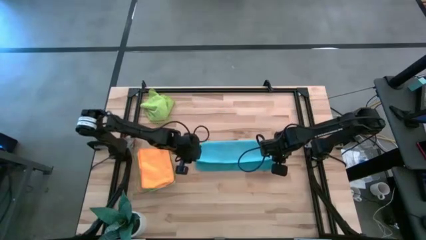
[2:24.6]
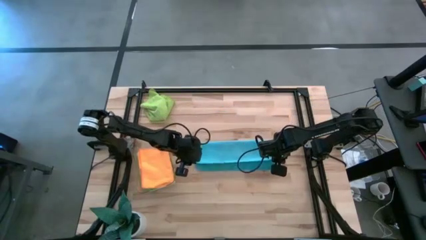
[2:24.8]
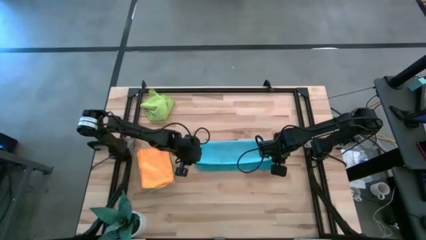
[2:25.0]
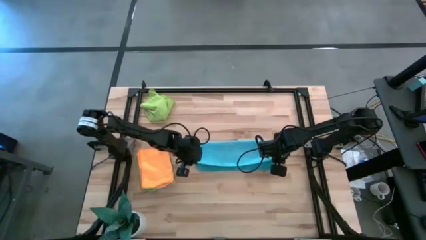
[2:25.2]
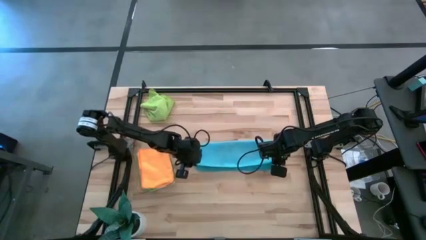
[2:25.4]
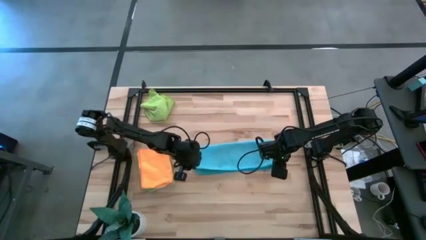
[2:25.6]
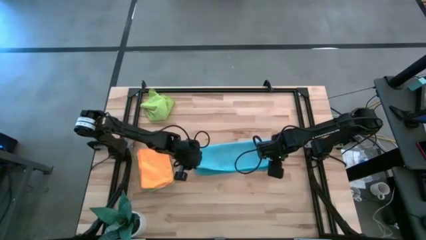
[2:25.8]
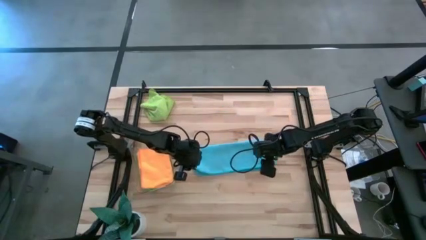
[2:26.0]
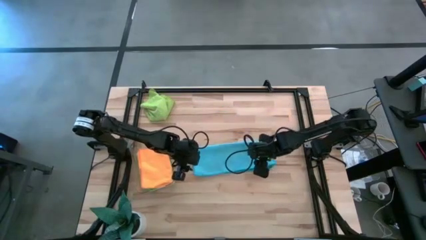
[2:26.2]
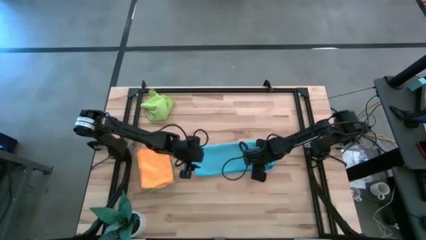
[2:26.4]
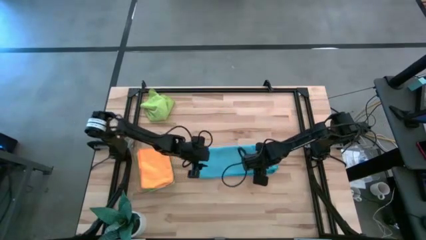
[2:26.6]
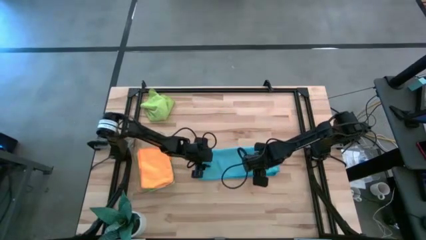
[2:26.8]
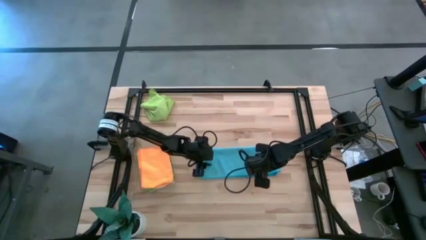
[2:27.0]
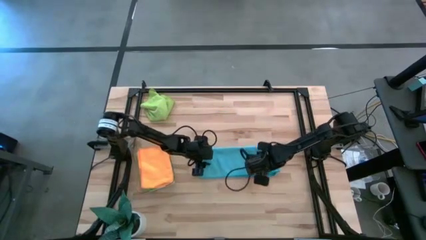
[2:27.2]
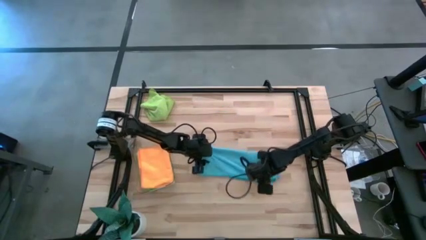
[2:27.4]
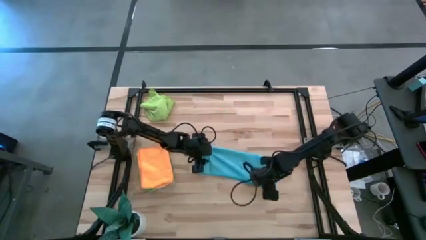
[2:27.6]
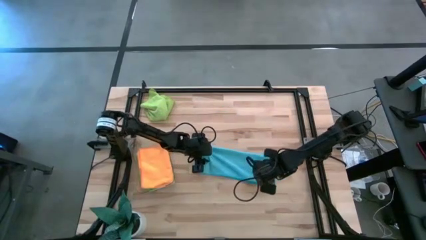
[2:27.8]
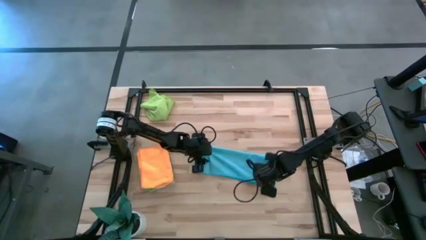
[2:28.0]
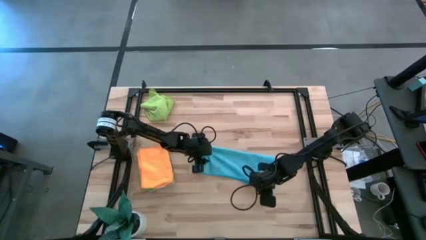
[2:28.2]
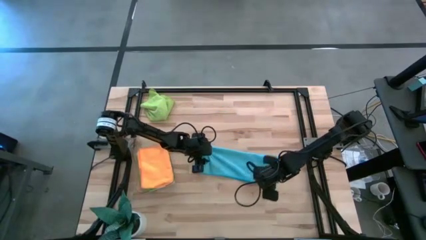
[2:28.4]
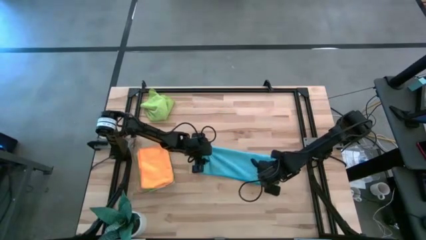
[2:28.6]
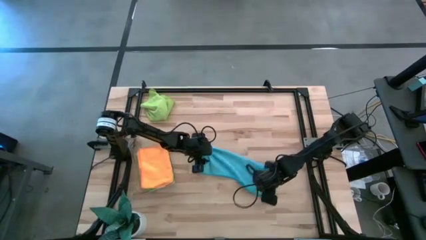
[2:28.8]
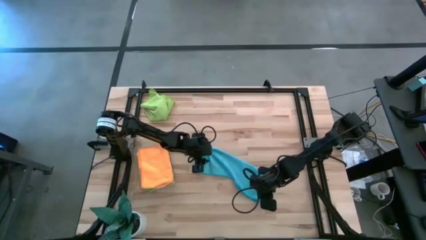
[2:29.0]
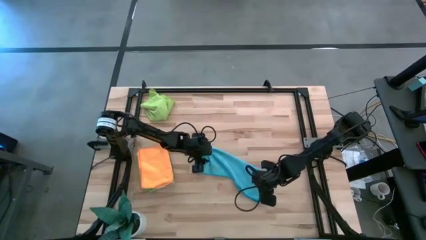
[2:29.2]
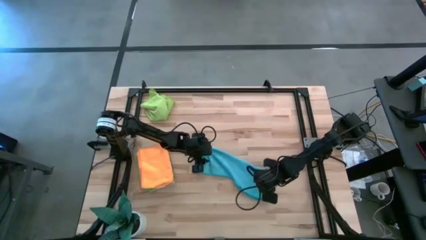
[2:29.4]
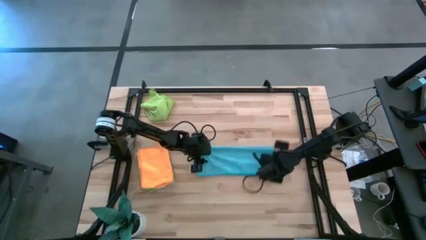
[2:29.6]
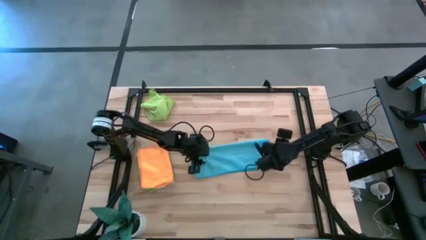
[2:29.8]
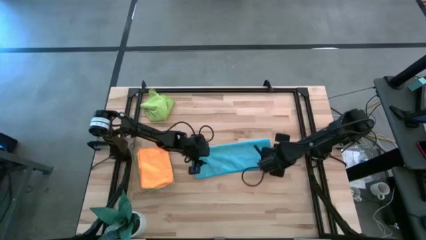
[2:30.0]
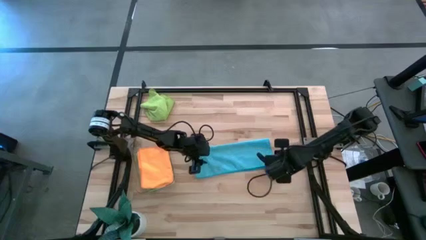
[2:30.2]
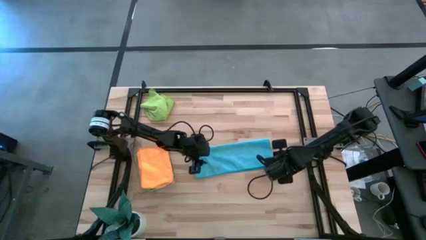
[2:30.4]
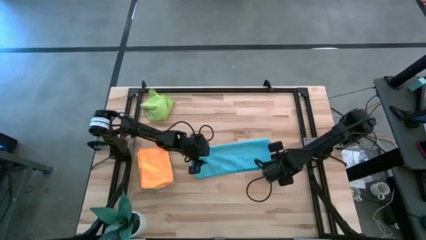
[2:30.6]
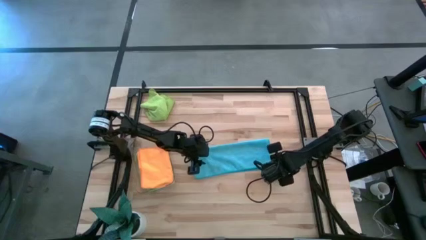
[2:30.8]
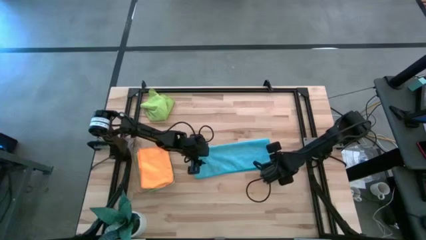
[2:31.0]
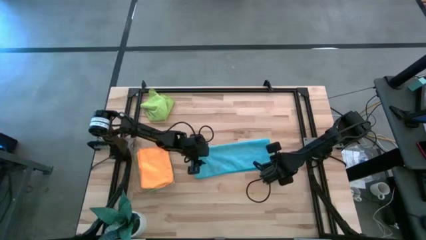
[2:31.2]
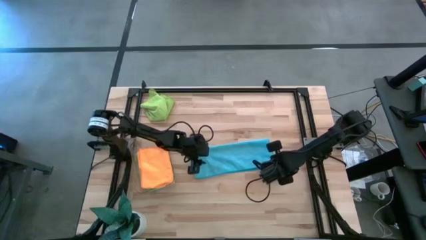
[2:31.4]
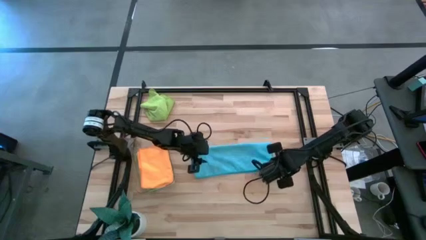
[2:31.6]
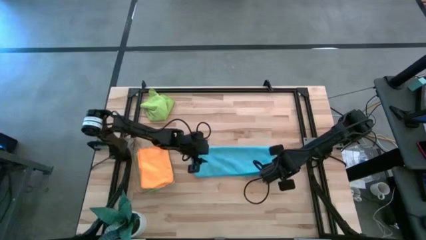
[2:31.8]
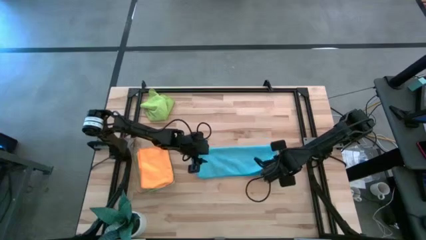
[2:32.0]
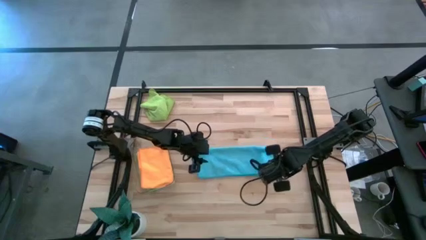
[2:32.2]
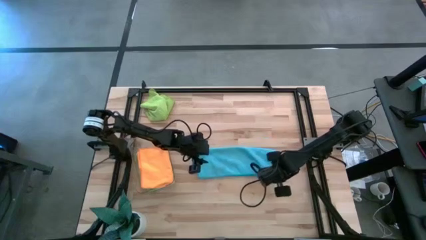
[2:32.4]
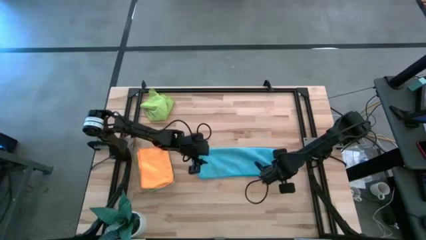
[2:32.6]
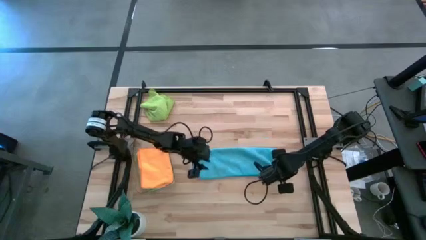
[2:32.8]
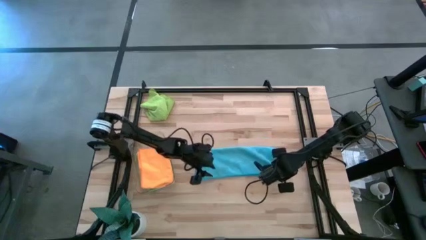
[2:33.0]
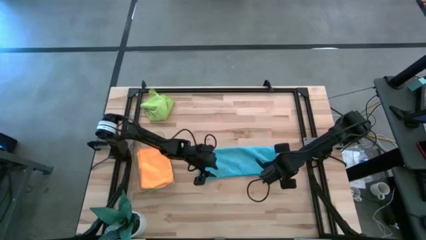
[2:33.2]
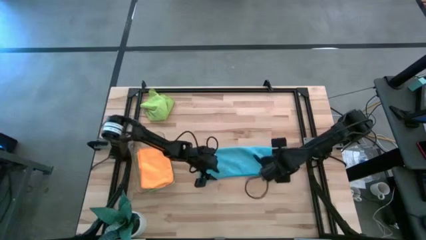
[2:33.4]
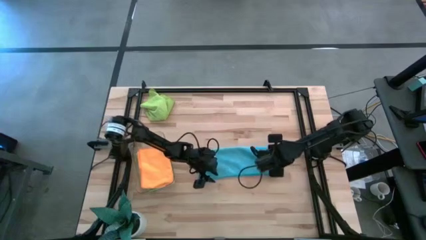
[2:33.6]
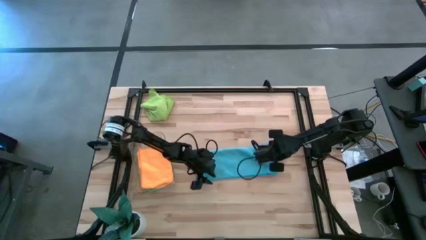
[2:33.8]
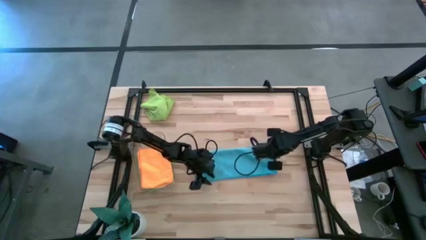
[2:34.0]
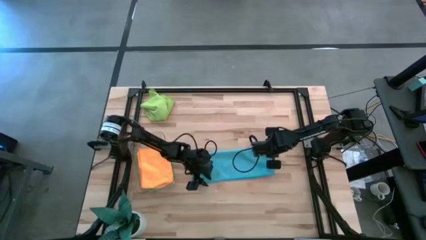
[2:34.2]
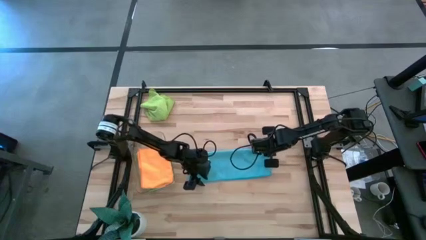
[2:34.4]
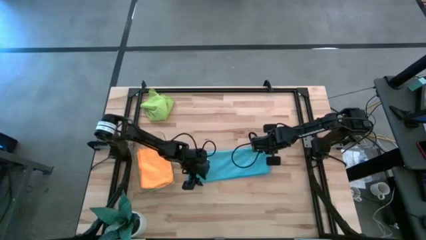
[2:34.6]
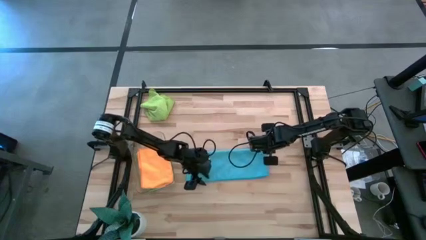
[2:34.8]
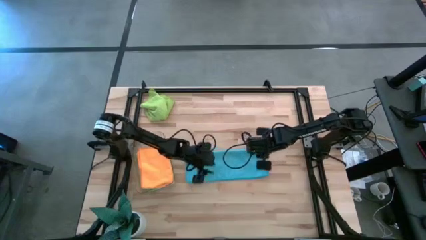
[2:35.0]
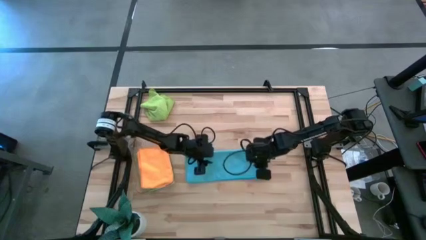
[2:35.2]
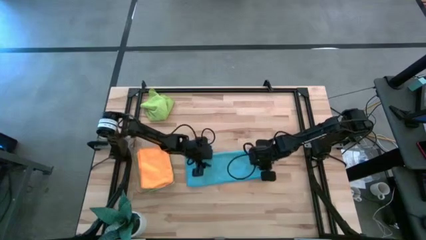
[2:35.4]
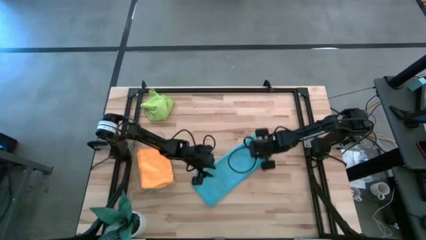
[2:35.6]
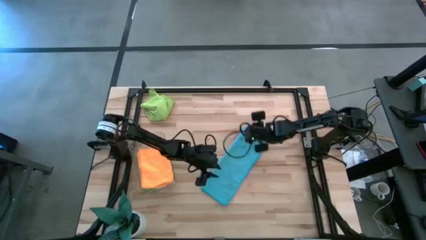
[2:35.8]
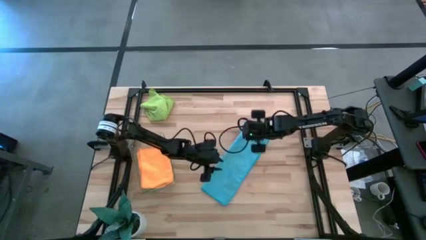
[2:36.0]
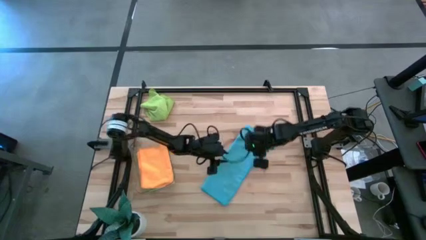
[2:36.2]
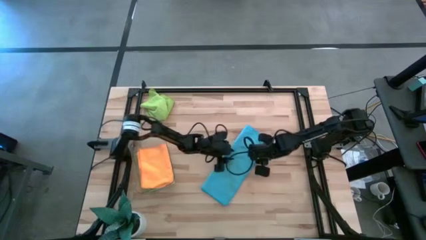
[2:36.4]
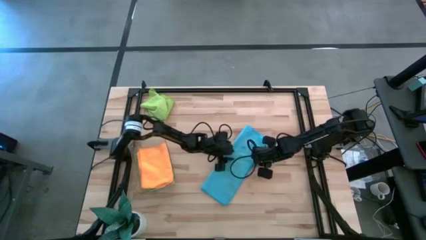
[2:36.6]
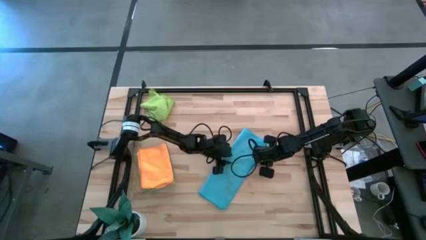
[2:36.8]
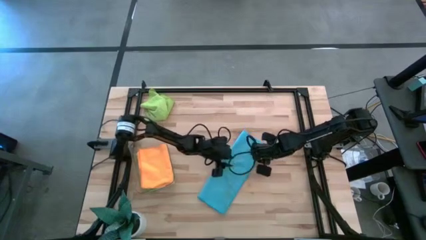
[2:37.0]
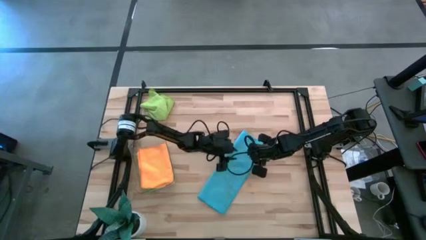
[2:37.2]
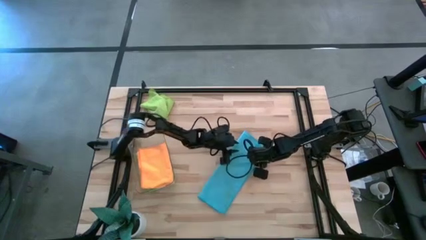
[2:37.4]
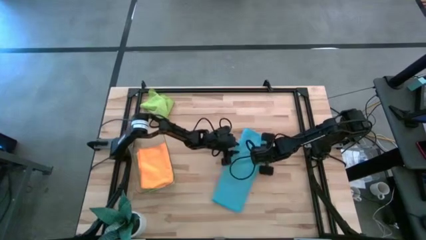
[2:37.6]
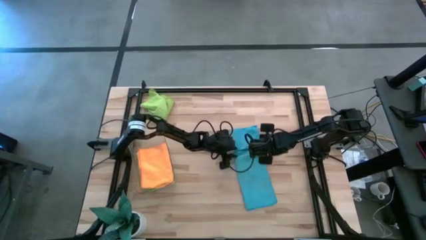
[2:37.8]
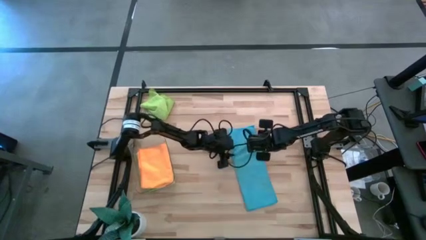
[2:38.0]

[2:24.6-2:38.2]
Task: Fold microfiber towels
Fold the blue microfiber towel on the table
